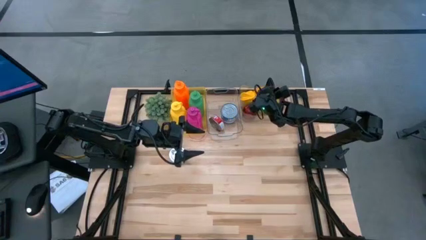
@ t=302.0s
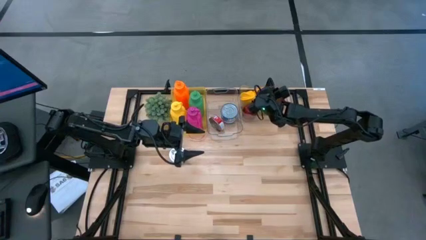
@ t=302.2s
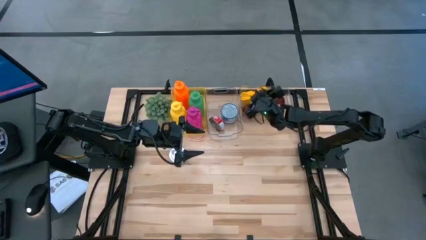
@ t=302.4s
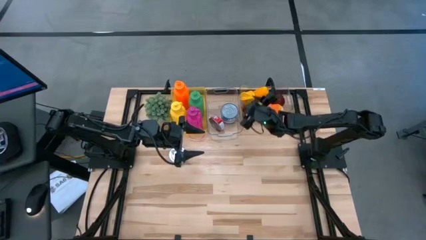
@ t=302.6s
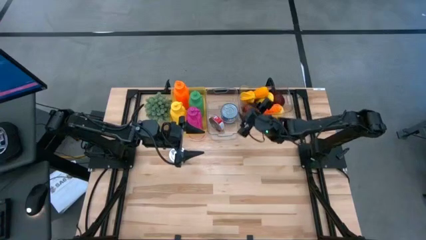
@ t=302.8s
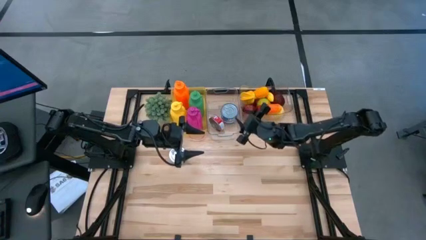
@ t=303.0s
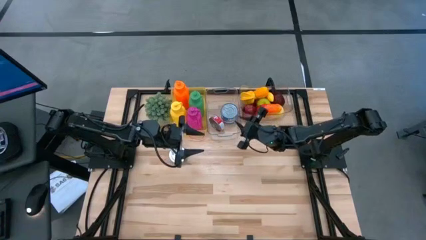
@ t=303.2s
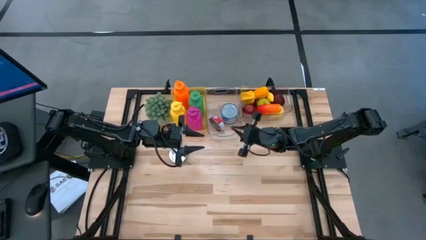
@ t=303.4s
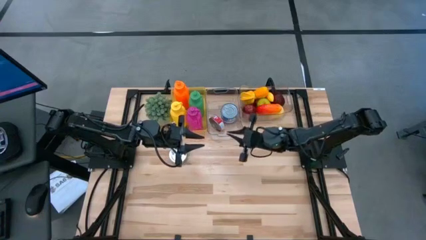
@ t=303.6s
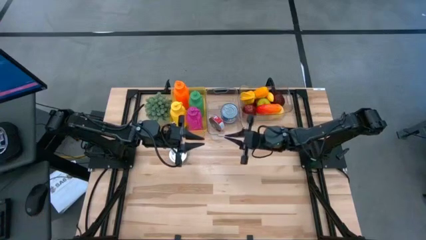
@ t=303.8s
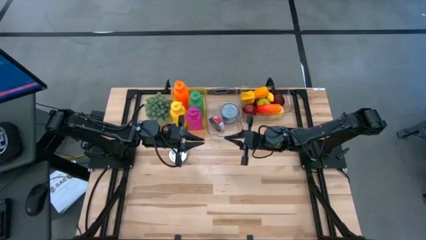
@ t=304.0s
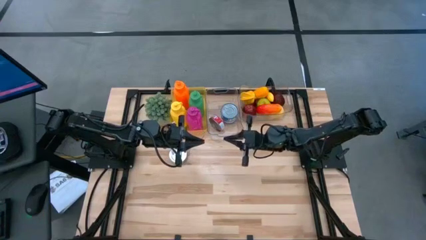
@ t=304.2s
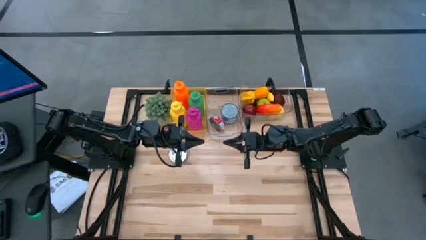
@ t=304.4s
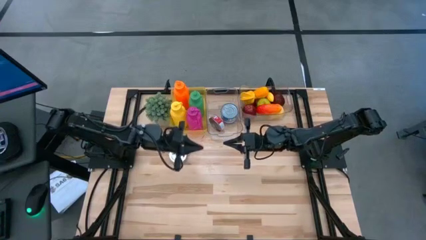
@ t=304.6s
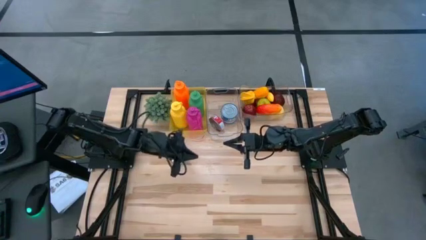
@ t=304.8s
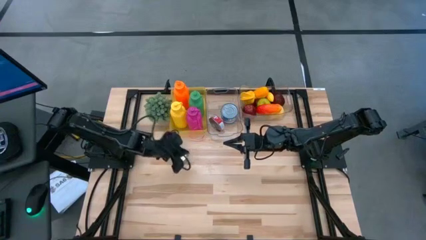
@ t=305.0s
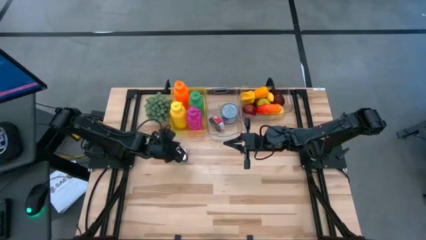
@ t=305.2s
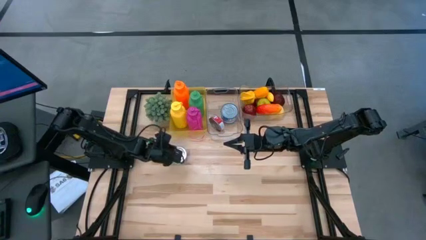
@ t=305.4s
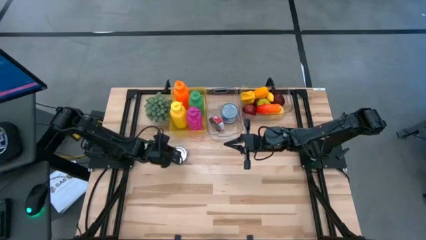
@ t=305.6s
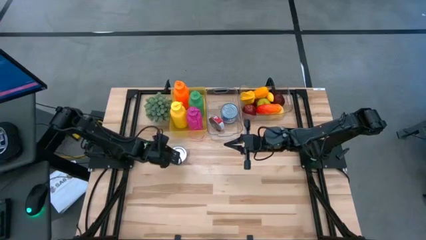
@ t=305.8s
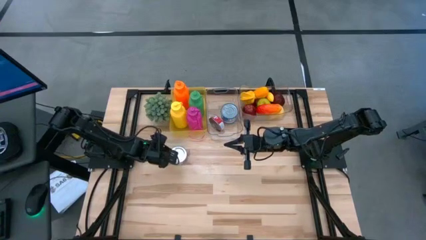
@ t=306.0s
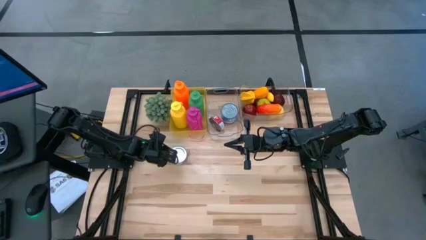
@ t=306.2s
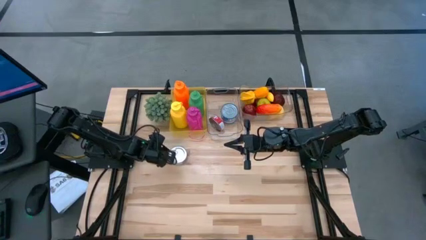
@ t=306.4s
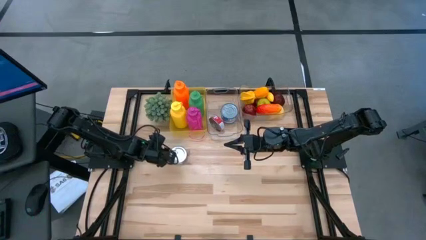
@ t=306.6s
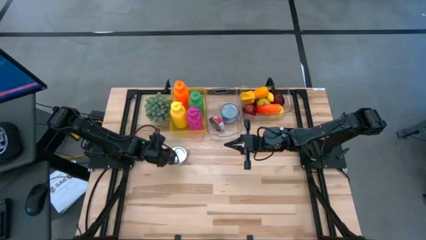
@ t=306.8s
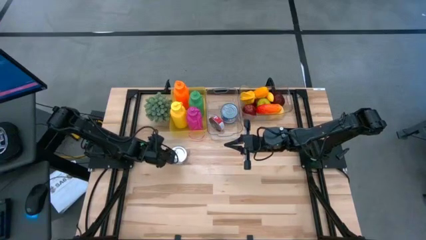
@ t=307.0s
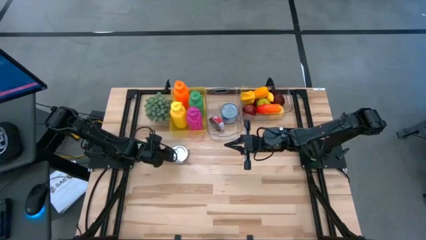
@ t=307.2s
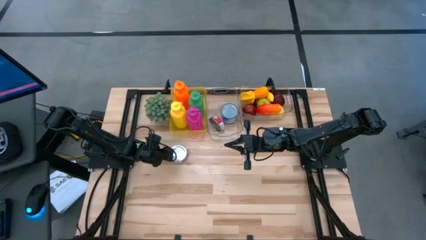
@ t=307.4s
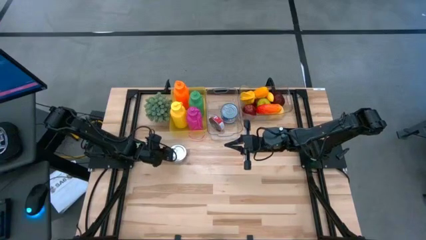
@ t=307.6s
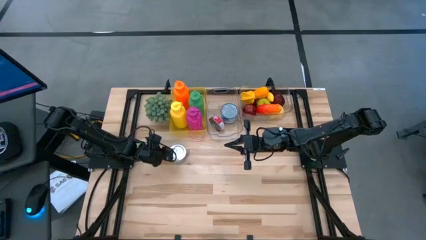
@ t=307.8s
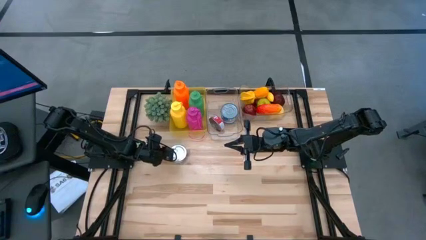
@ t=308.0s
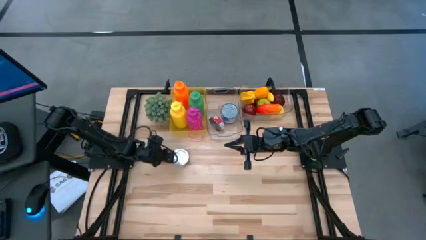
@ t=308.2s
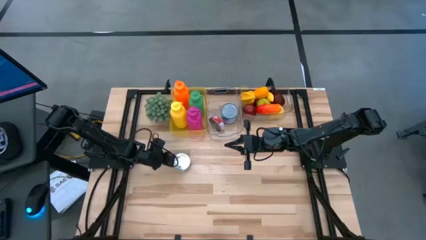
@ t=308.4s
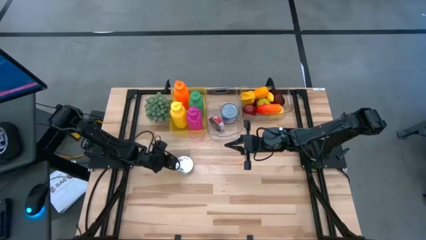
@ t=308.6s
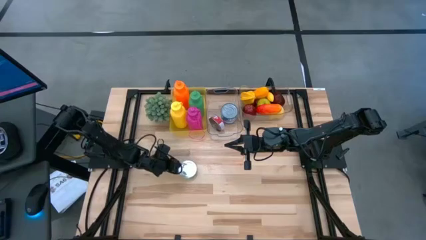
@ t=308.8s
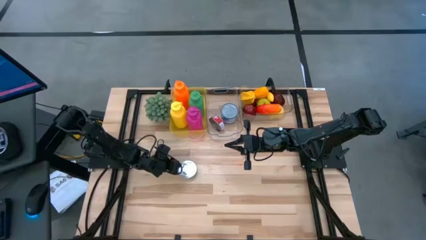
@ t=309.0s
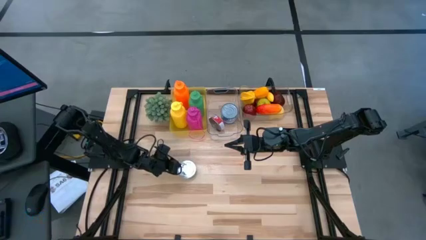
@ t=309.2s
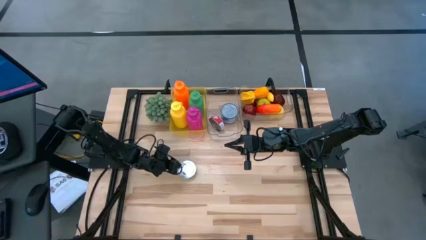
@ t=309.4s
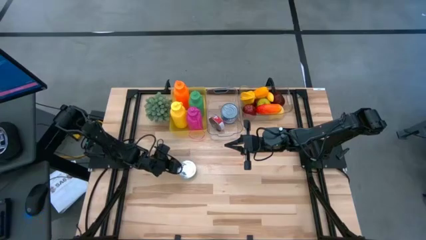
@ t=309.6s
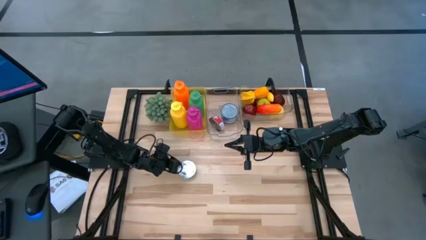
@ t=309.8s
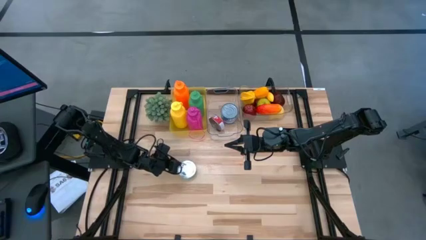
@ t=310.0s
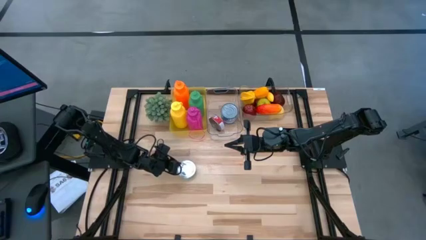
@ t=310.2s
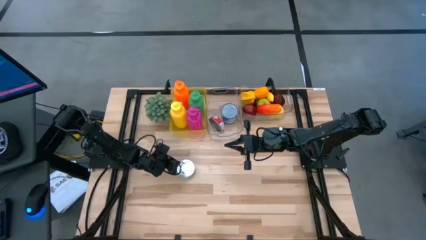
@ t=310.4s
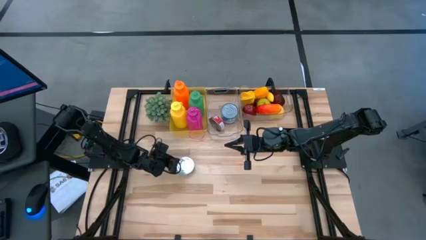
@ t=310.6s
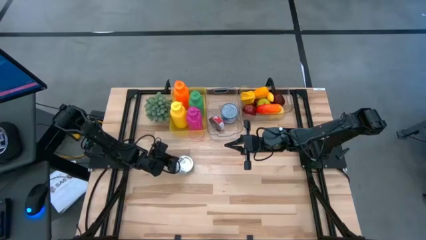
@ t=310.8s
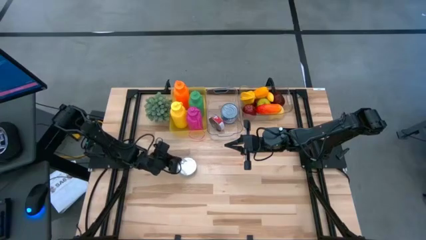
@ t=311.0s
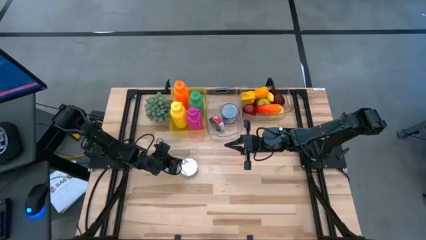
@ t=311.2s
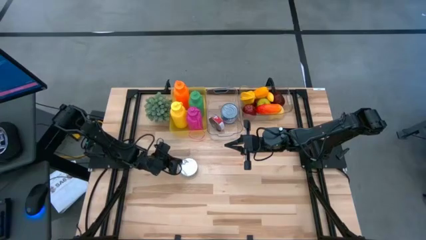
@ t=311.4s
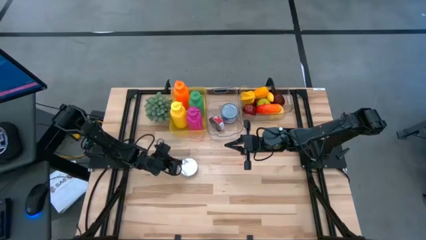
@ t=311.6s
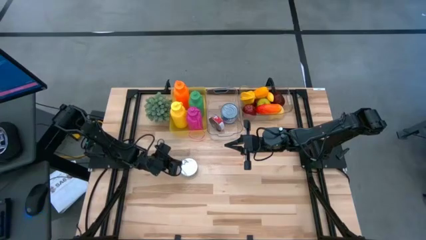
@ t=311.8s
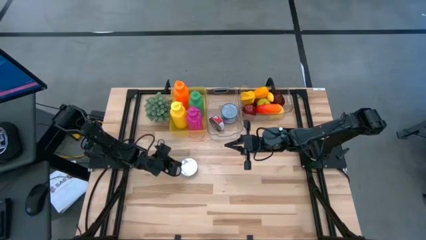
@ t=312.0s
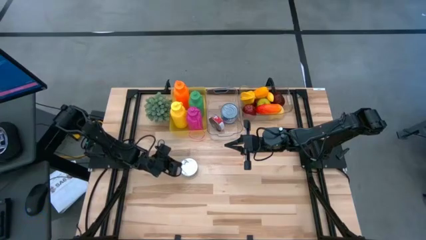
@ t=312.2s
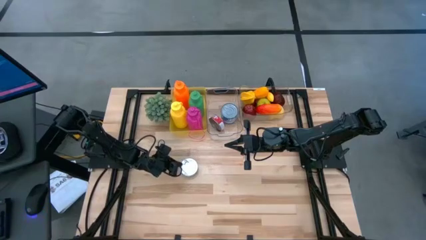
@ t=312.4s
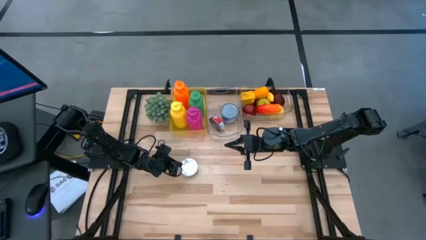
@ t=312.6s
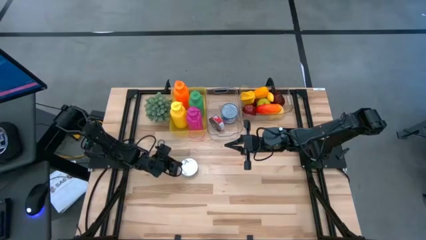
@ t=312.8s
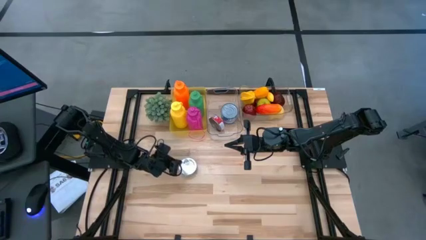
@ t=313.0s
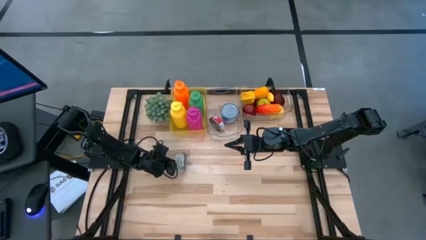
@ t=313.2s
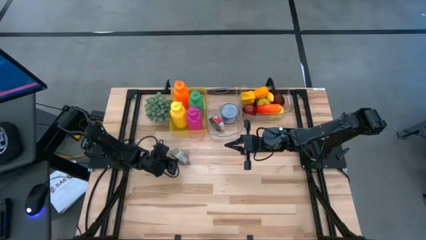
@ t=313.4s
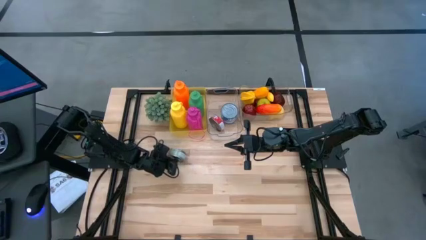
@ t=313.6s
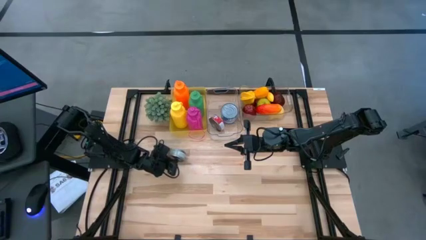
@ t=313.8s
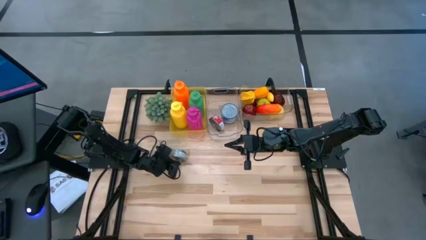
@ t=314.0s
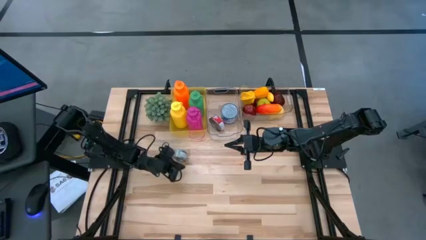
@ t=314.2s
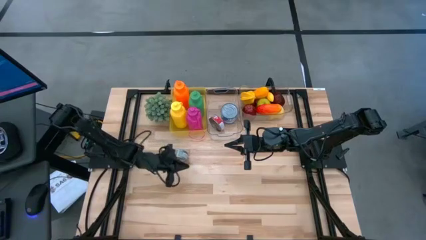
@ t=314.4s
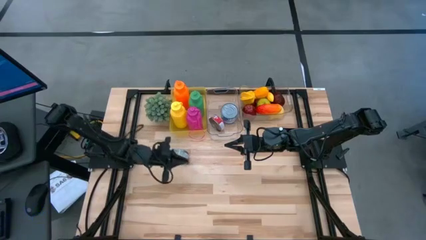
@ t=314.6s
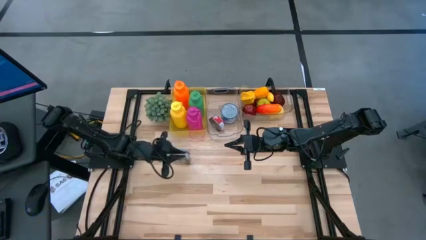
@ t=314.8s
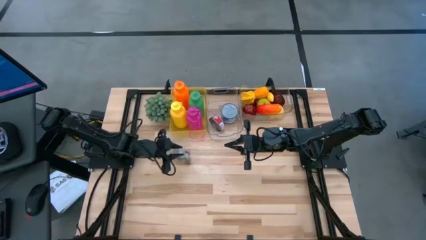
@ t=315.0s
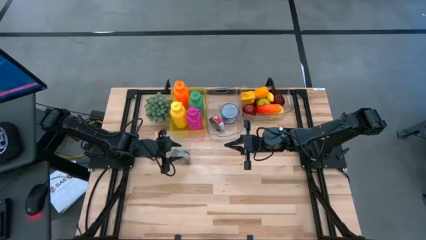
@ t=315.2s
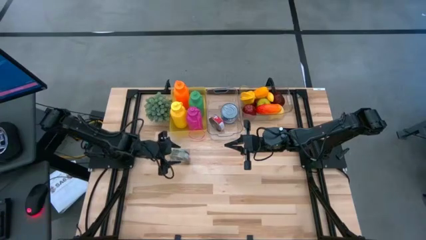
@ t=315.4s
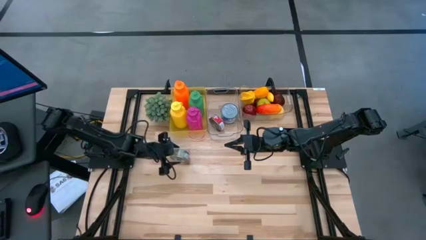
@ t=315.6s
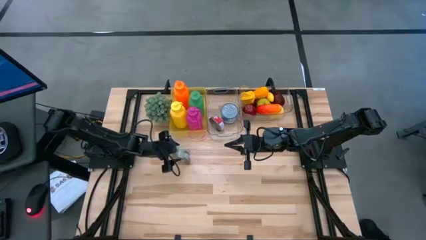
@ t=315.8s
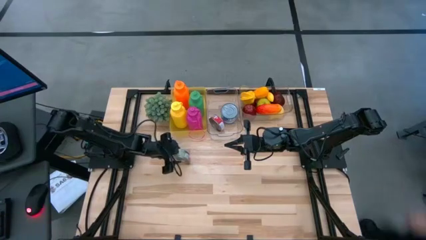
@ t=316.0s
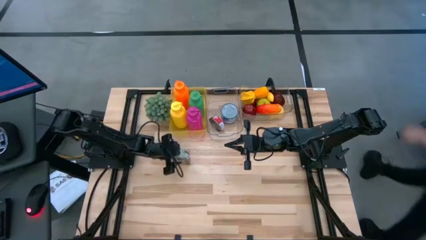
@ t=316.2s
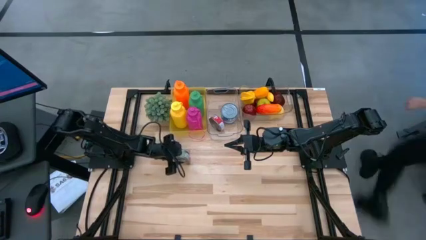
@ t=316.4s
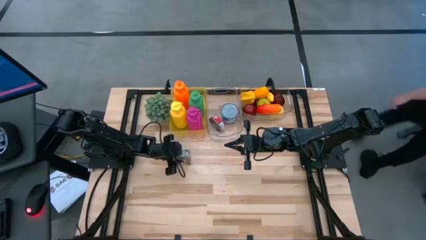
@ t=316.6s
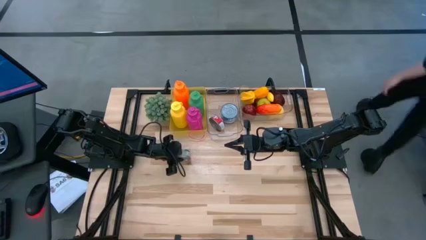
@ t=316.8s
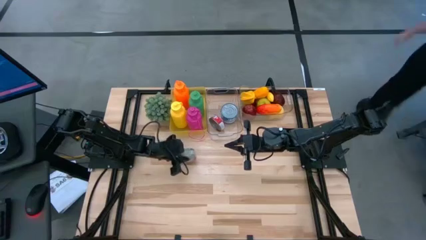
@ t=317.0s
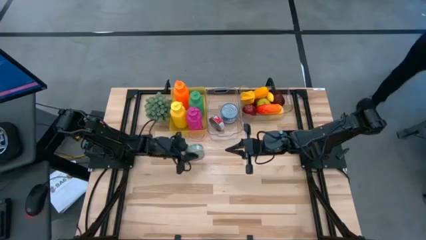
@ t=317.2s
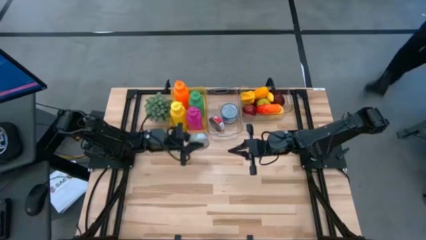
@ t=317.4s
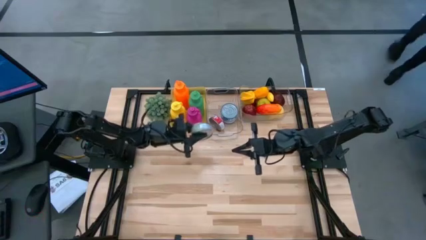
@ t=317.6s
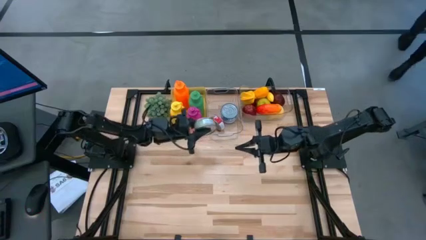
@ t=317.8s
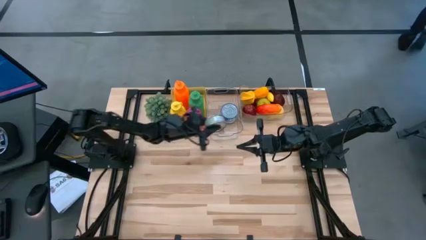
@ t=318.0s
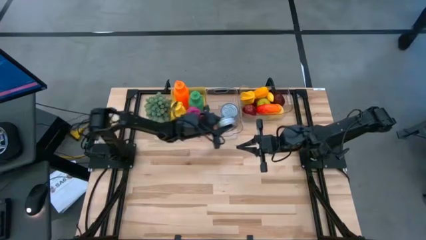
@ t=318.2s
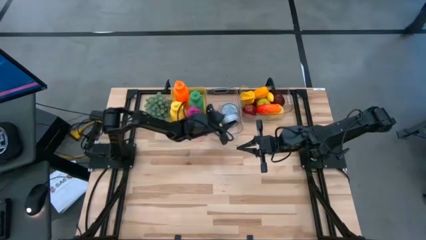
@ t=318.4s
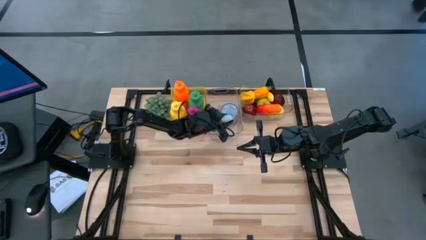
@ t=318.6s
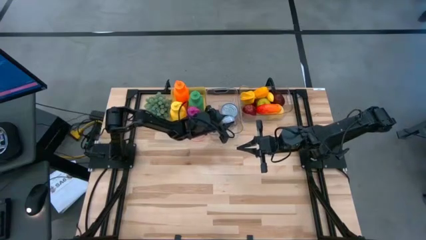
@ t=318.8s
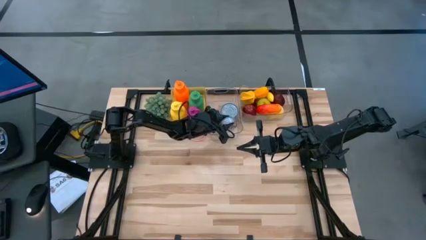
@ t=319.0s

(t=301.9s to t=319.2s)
Task: Pick & Place Food Item
Put the green tuna can into the left transparent bin
